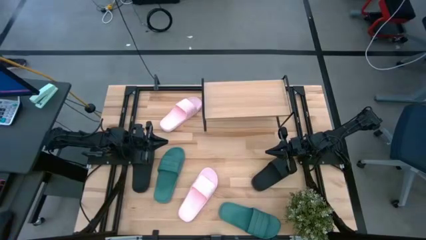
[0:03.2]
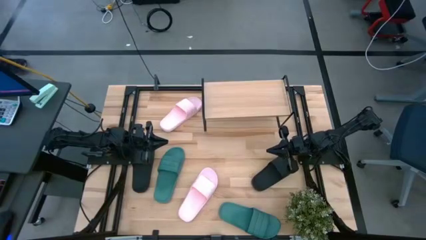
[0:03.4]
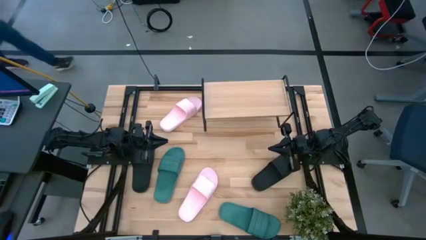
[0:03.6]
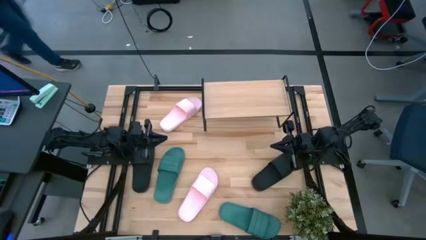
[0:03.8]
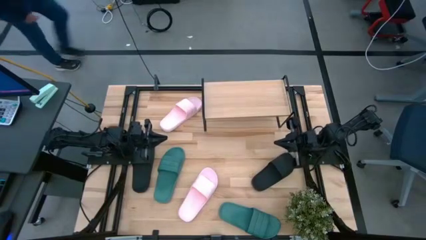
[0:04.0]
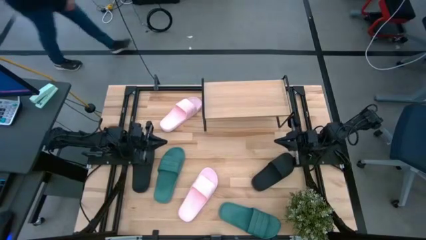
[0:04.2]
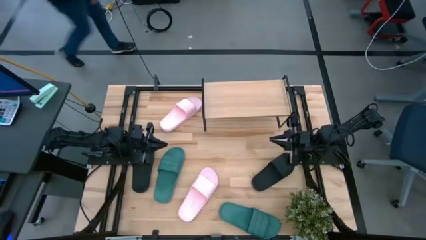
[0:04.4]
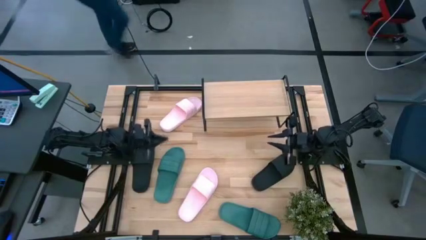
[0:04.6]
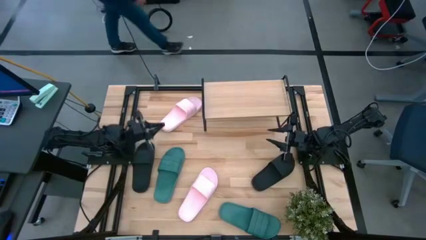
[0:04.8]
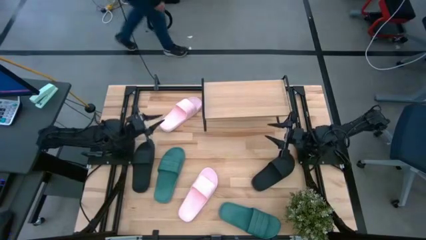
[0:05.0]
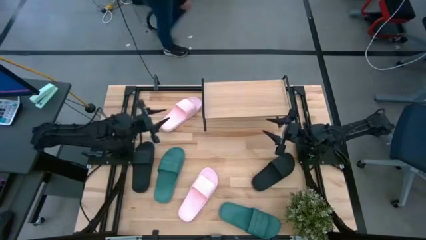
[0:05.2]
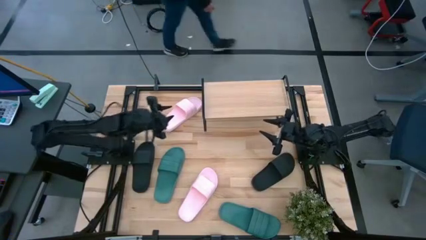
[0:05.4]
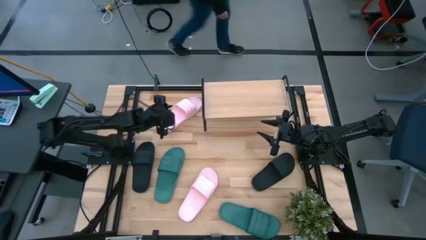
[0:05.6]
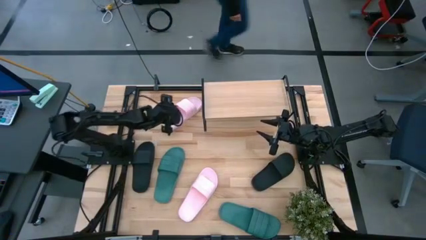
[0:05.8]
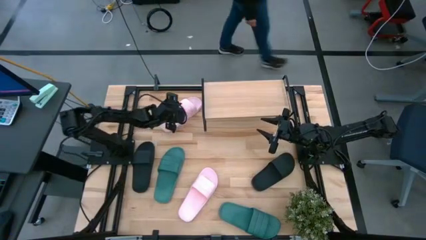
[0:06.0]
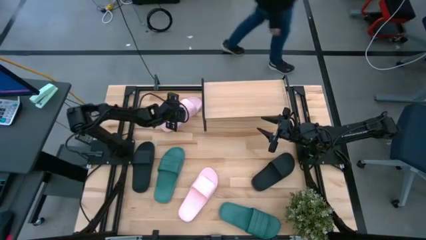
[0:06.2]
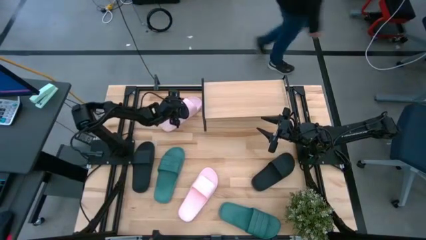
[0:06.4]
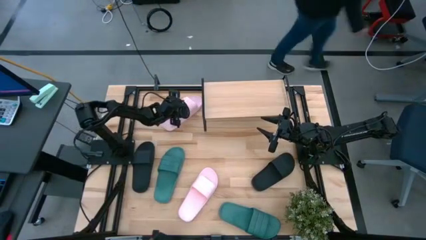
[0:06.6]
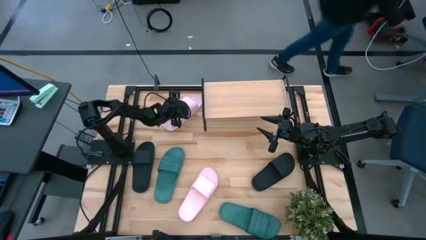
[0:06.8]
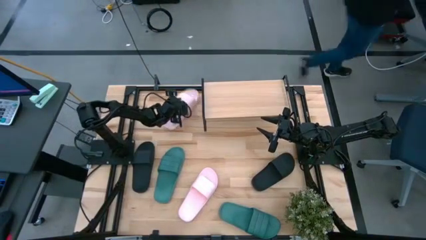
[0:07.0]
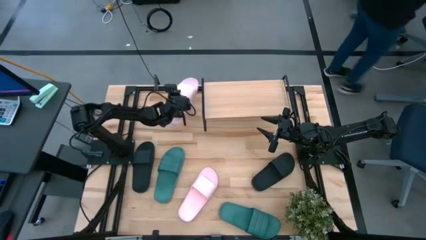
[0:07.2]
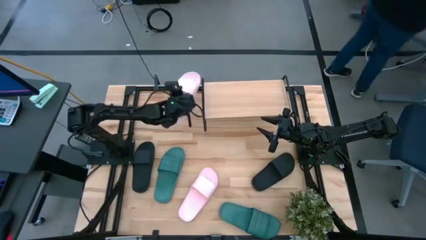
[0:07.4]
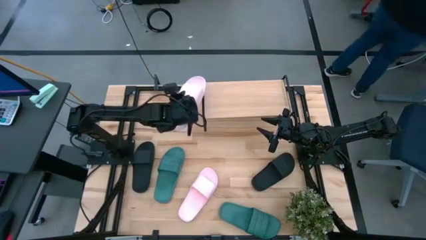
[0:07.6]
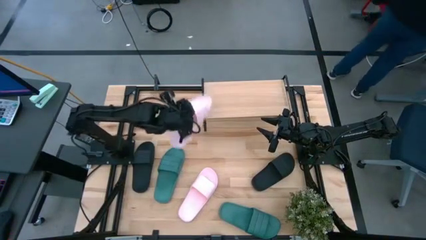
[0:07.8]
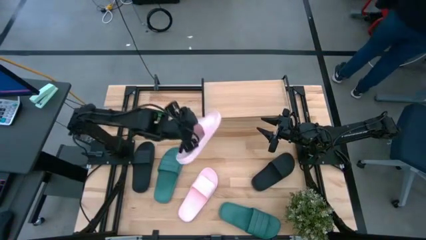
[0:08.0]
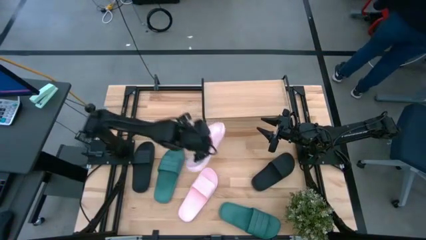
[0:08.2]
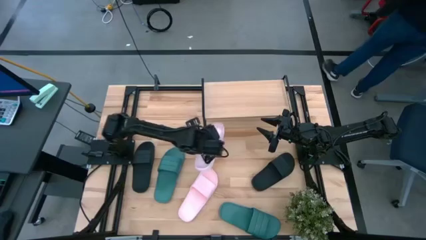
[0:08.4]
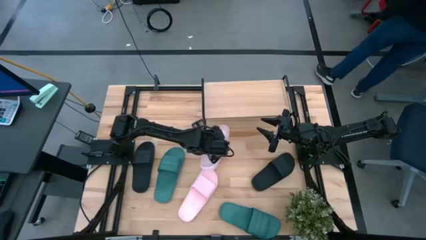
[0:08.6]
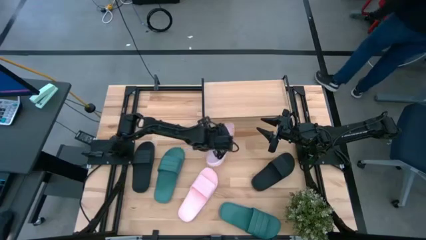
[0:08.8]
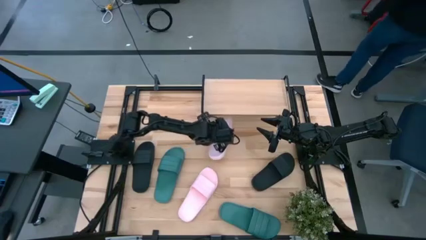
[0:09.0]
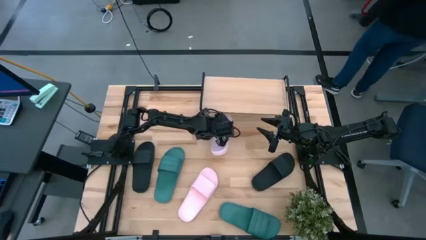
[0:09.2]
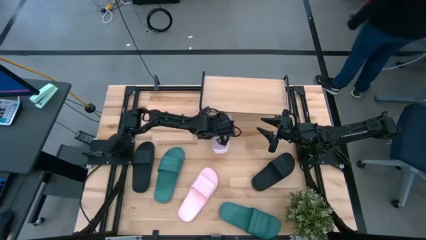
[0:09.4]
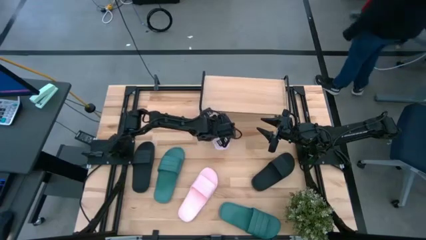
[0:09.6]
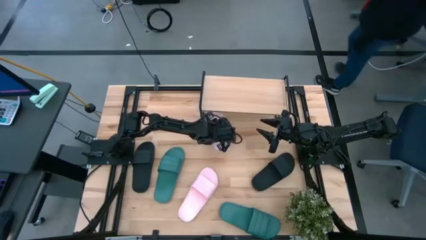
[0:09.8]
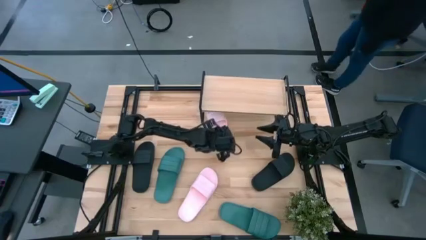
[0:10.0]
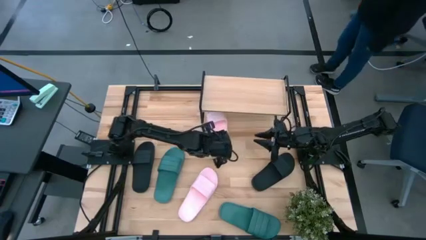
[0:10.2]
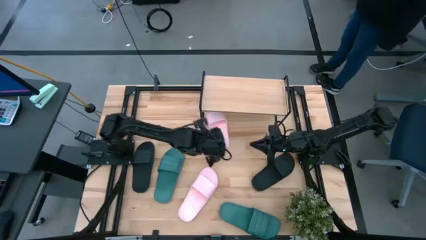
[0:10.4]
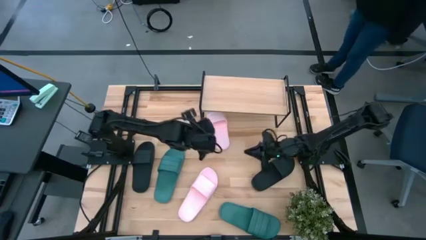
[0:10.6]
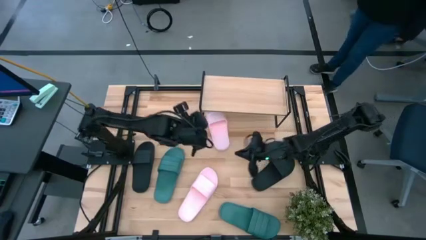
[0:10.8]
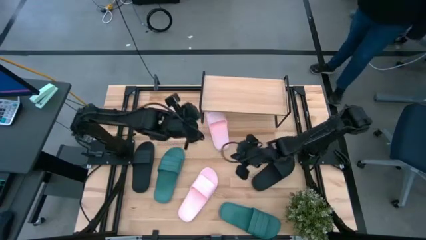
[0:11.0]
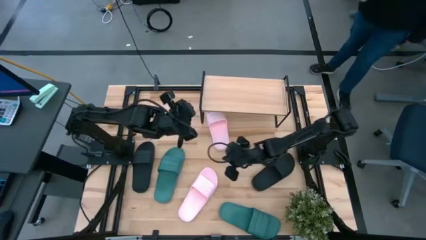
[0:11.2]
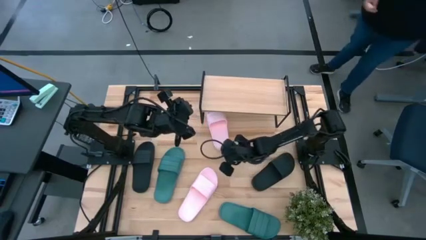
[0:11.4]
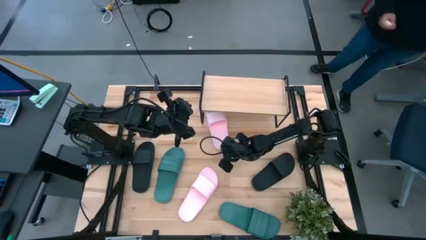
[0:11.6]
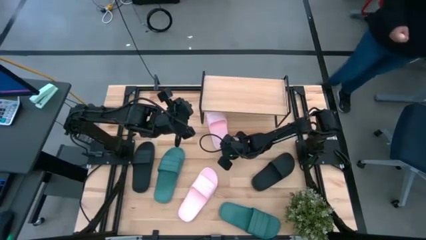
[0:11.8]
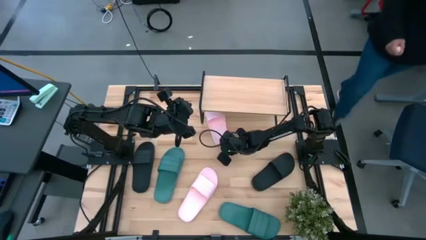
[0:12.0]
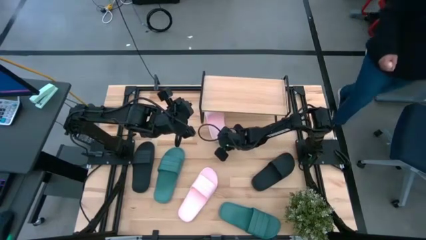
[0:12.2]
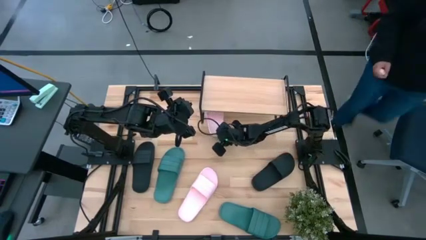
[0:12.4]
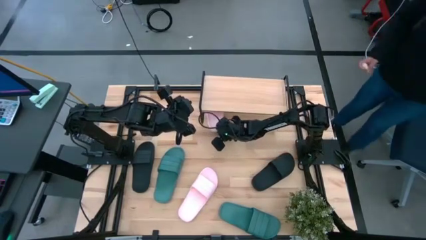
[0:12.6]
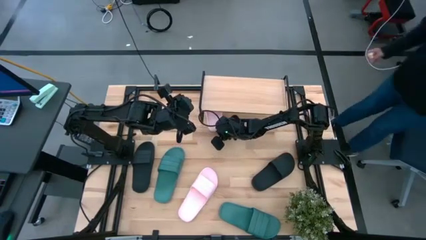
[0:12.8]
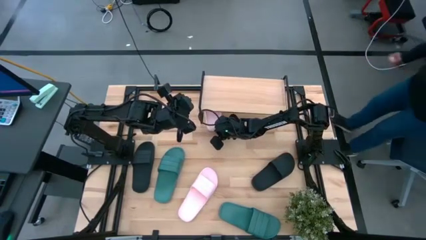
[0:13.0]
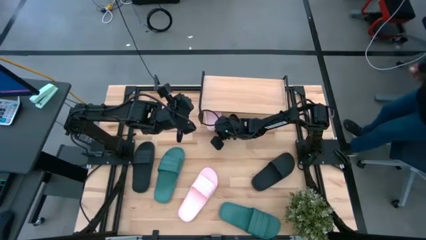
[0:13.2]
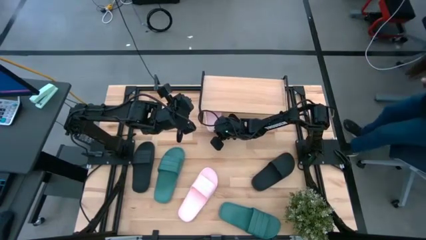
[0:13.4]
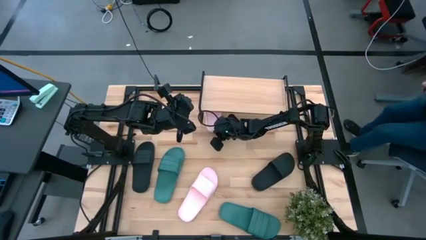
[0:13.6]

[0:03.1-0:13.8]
Task: Pick and place slides into the shelf
Put the left pink slide under the shelf

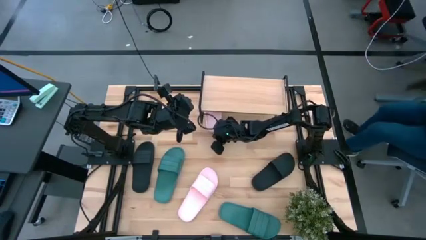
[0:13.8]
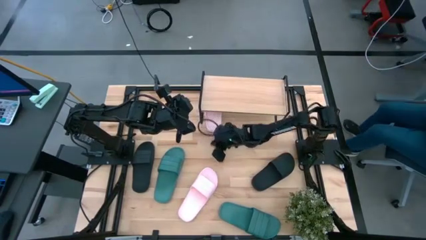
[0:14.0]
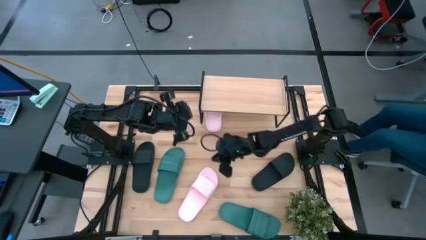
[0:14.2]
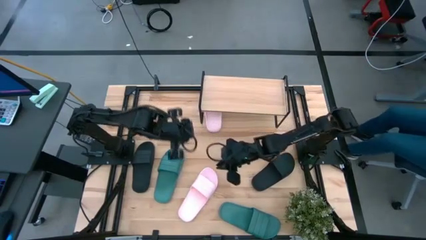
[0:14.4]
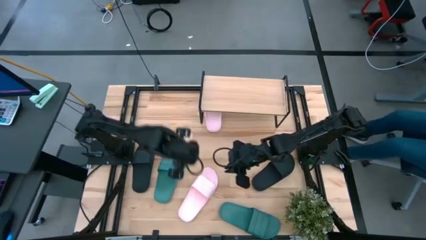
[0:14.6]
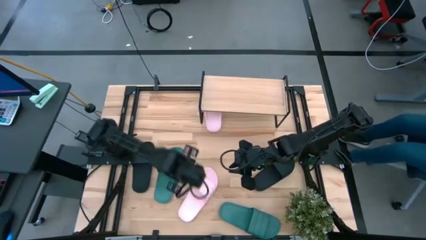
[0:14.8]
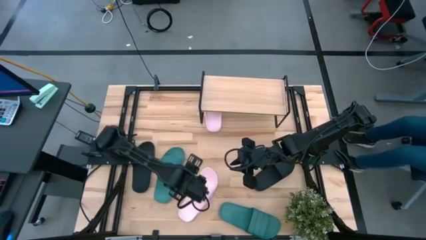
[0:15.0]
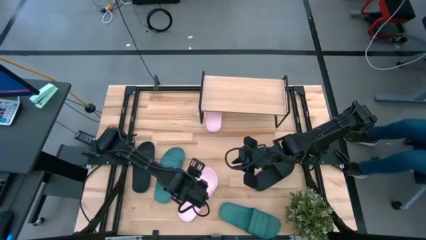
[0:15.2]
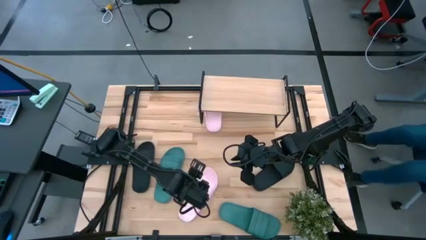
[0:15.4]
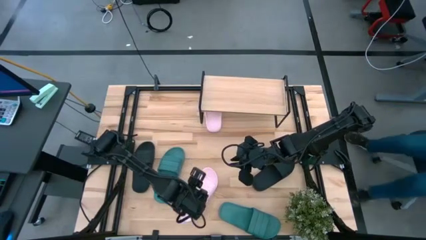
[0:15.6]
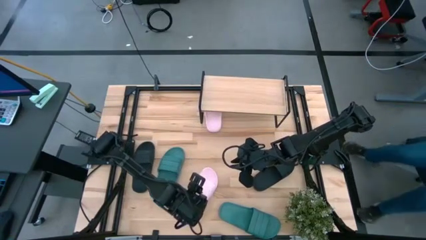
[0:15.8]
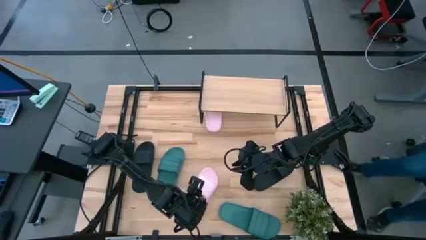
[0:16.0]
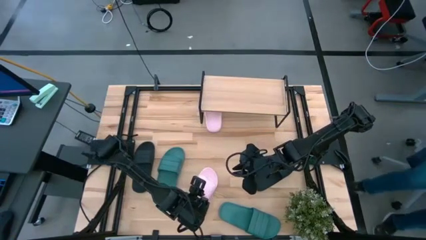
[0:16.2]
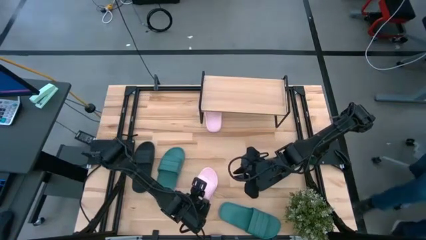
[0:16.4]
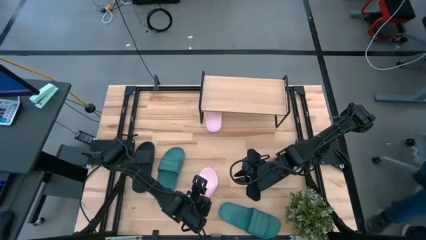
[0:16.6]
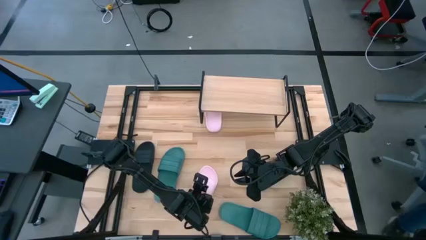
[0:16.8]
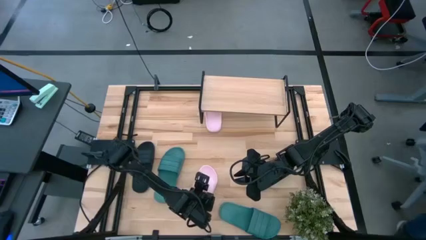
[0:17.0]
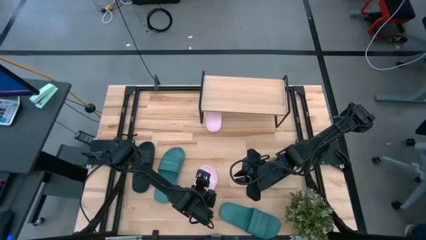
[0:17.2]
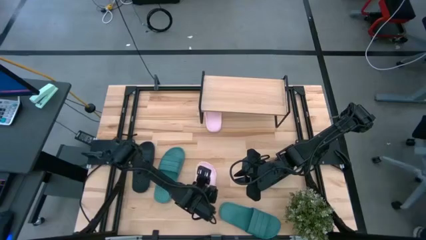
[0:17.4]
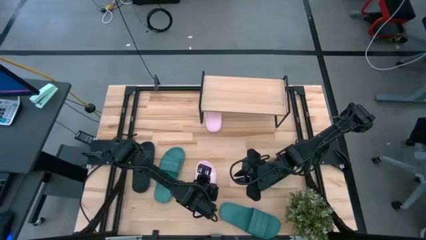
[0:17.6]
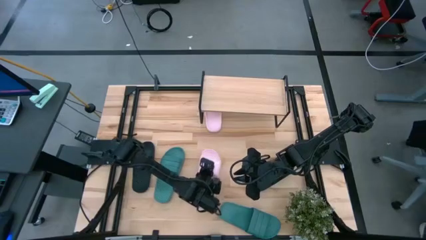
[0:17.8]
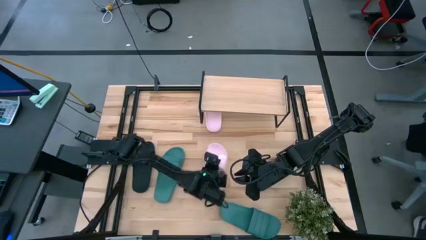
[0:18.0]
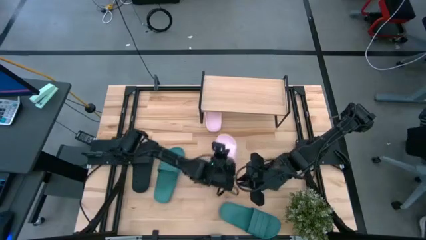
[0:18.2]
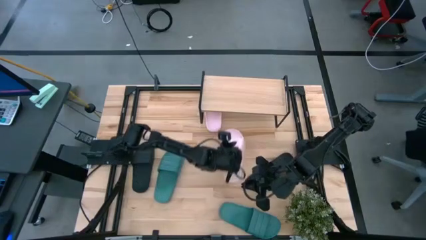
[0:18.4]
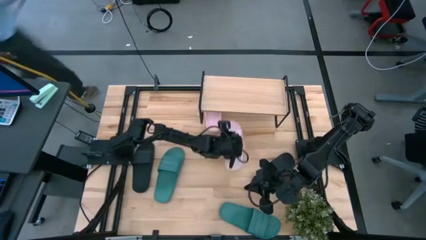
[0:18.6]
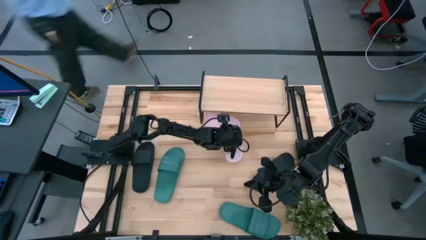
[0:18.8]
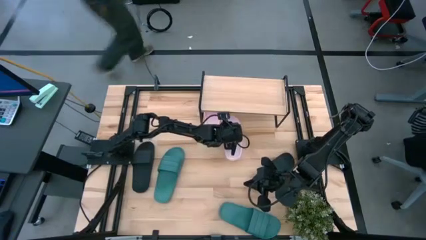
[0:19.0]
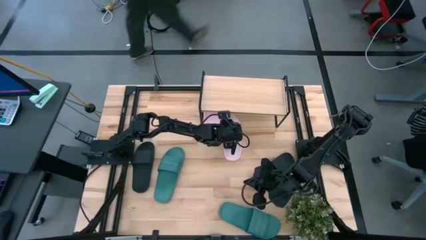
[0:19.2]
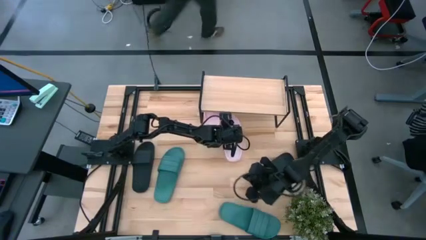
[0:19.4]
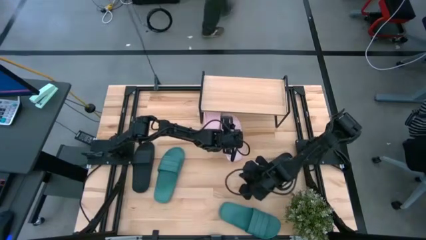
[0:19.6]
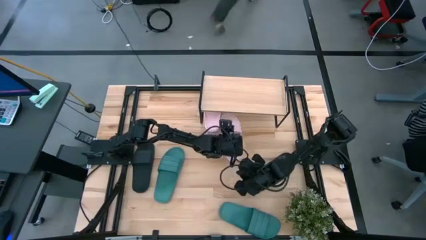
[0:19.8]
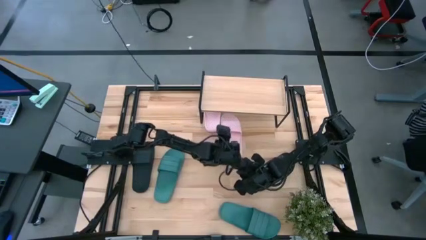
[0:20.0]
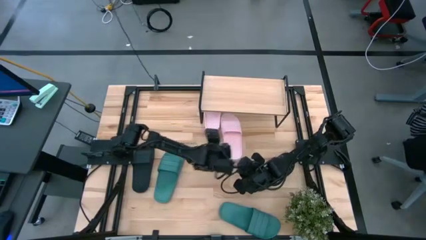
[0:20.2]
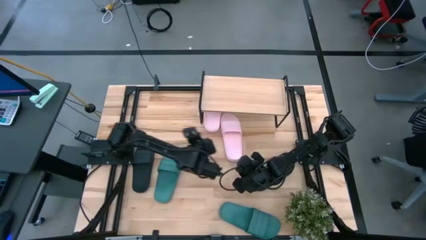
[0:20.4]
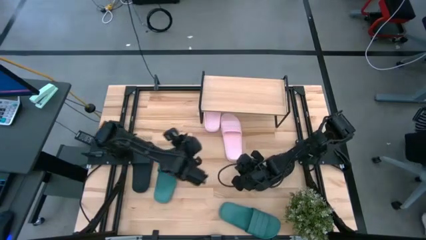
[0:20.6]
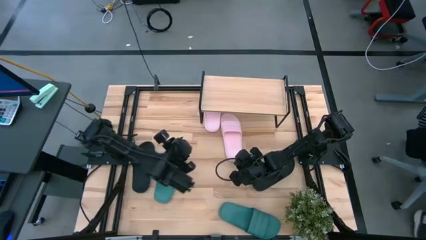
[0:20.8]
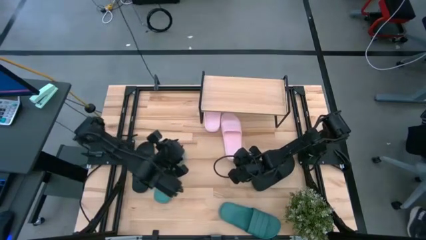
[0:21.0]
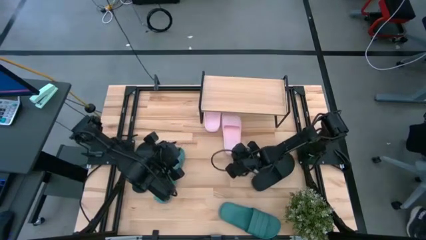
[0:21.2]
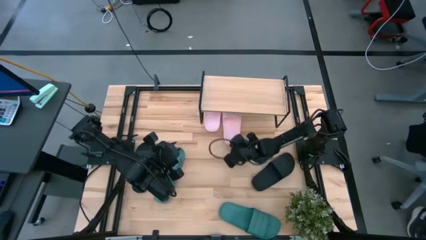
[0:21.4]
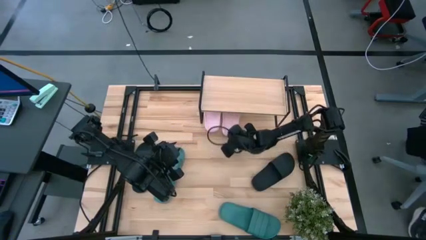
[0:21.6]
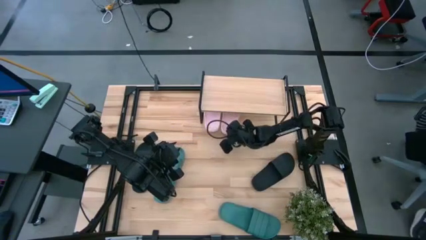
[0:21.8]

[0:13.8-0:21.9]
Put the pink slide under the shelf
